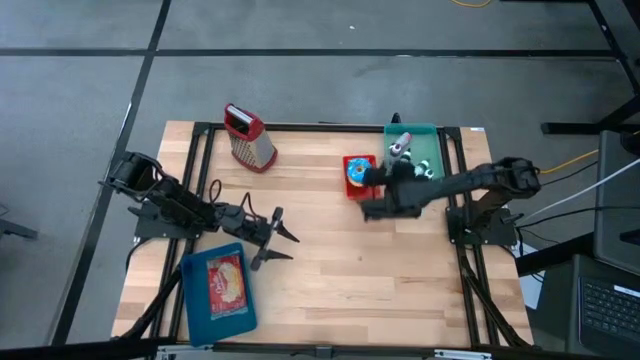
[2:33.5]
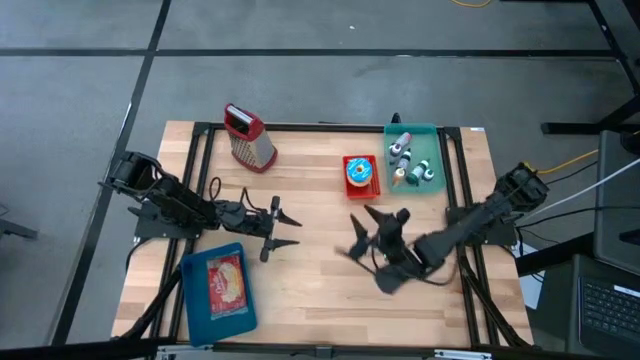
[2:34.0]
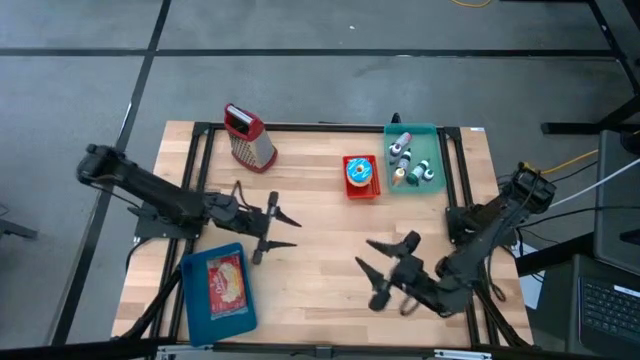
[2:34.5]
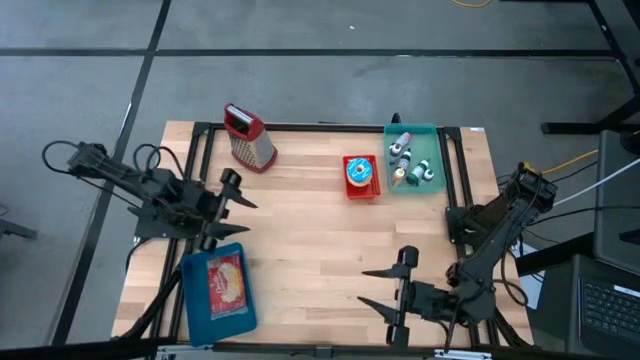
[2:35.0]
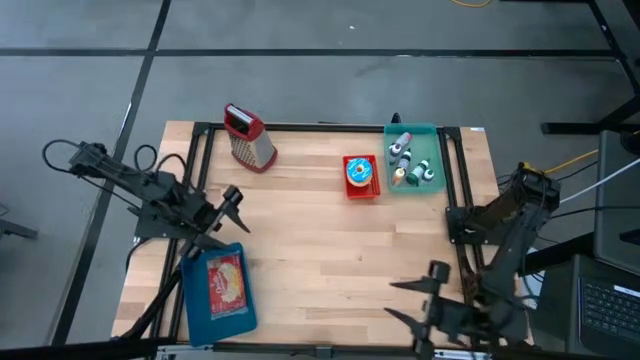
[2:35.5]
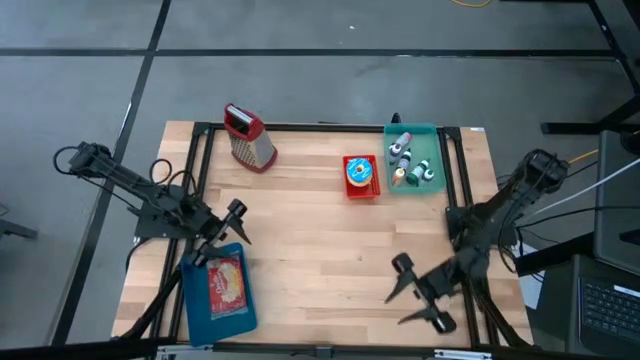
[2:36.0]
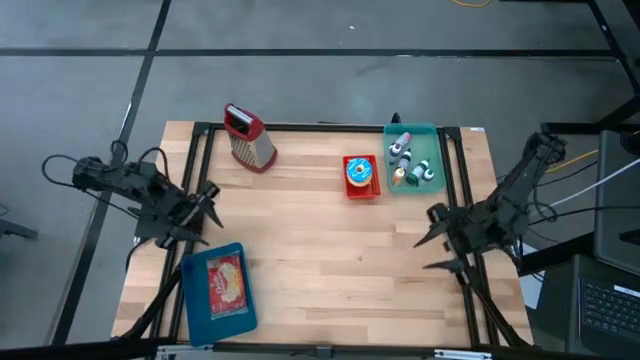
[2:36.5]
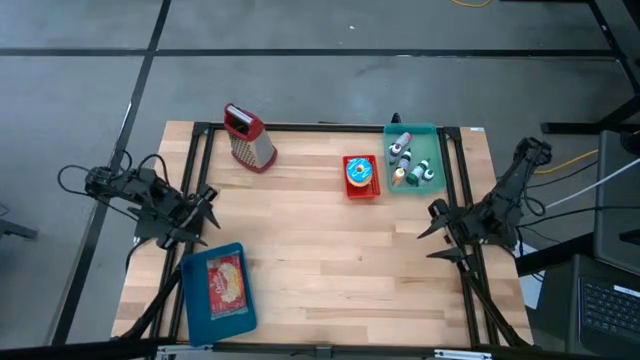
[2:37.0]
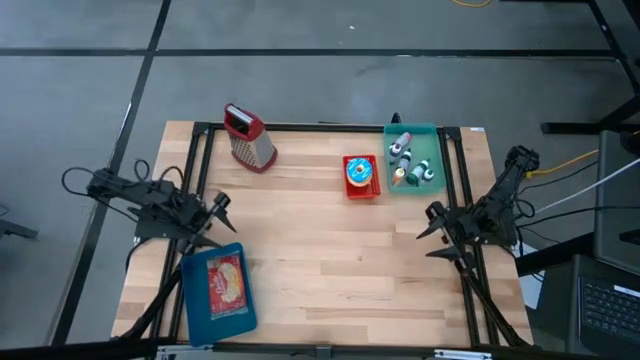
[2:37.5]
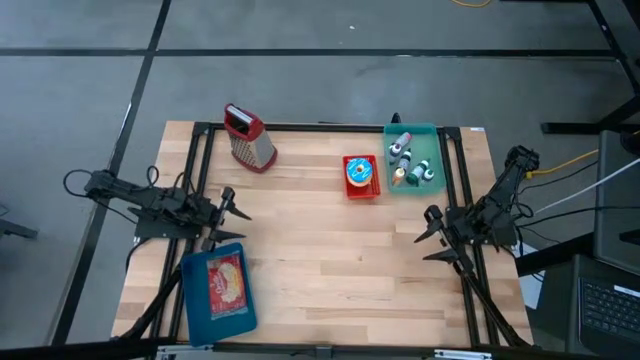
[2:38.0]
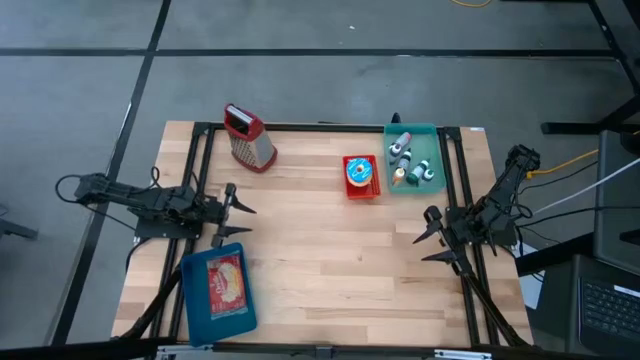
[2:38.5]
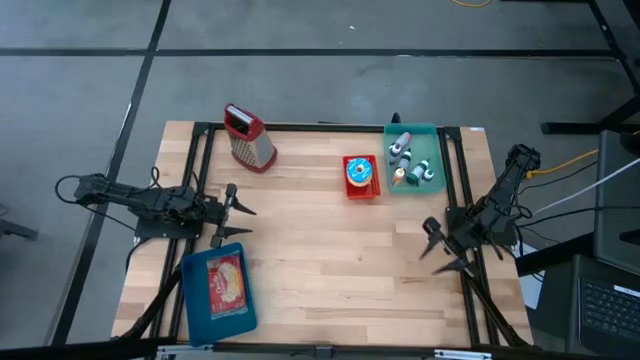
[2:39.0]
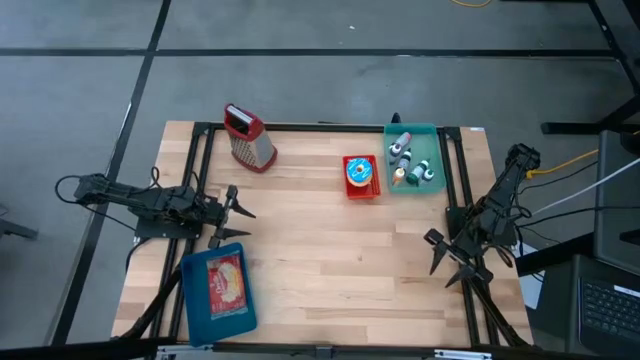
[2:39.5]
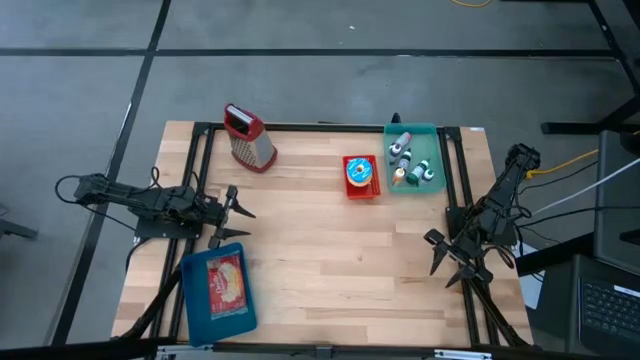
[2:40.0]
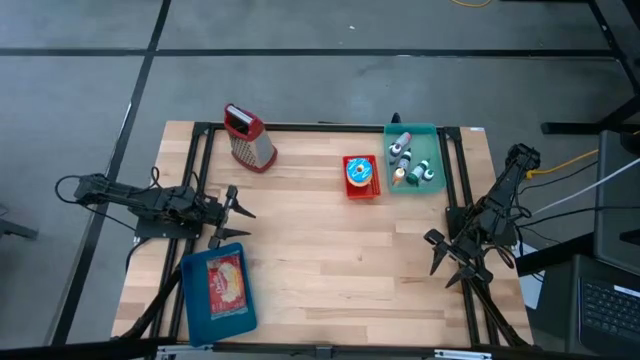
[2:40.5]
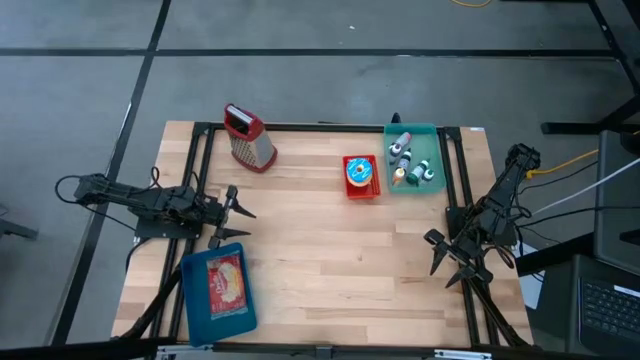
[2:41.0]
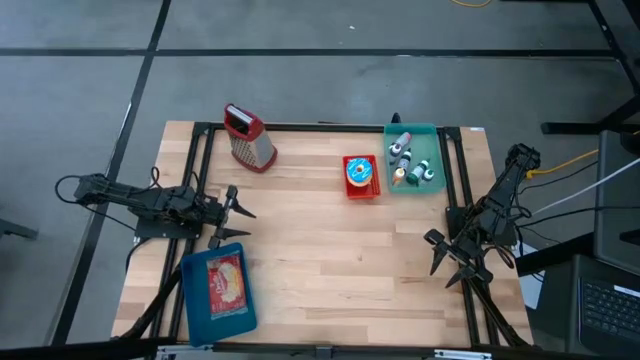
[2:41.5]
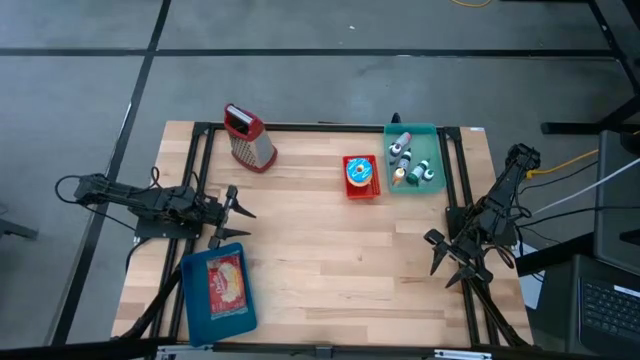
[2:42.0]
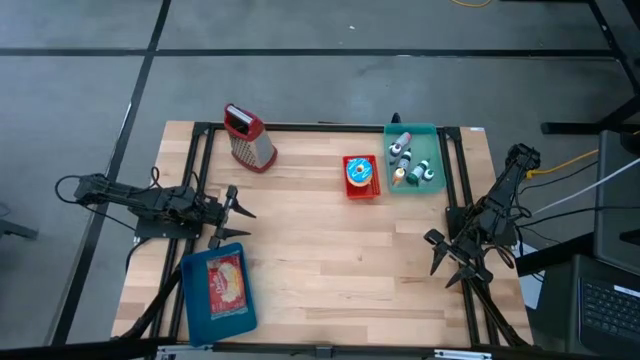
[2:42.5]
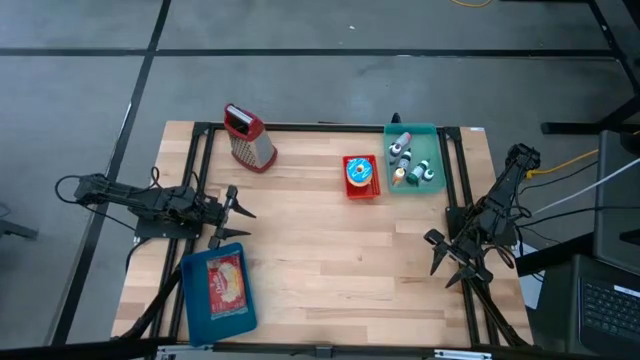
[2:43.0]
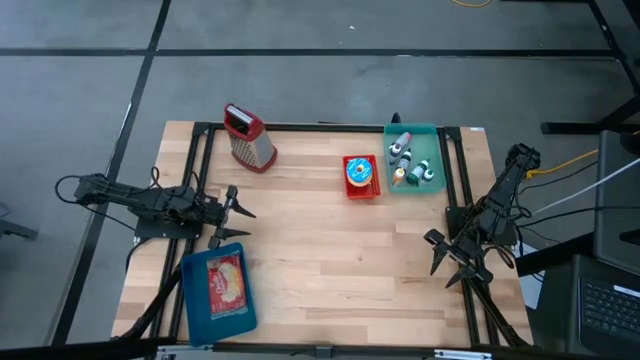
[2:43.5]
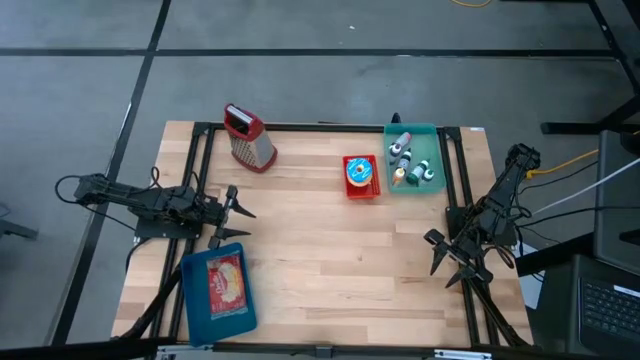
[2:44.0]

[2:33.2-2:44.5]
Return to home position
